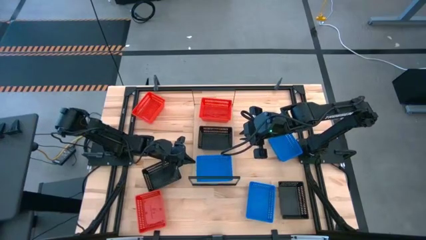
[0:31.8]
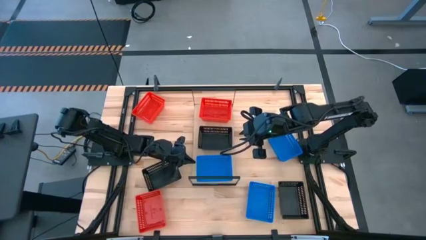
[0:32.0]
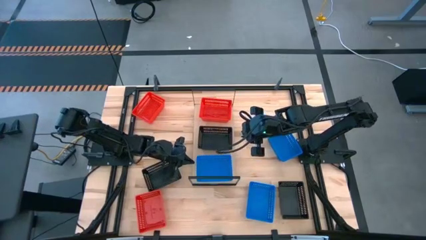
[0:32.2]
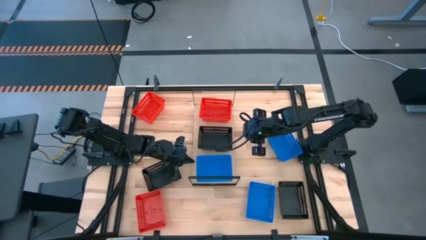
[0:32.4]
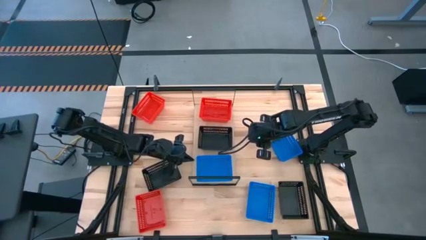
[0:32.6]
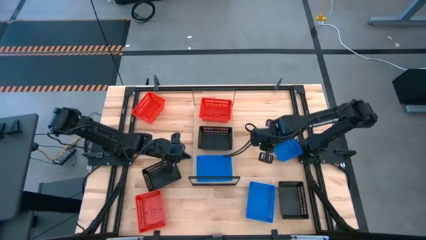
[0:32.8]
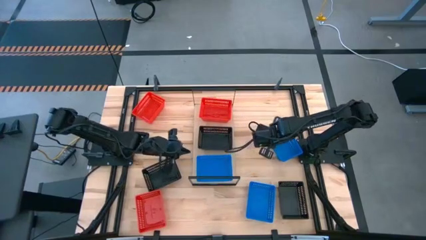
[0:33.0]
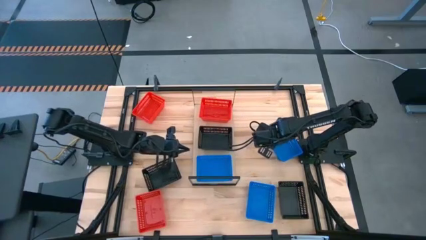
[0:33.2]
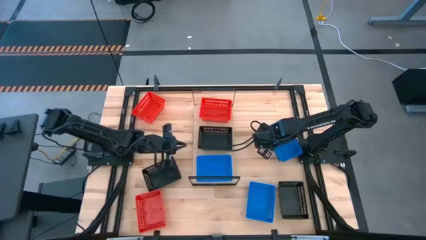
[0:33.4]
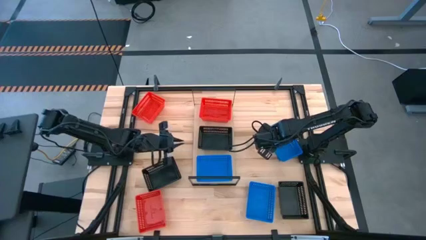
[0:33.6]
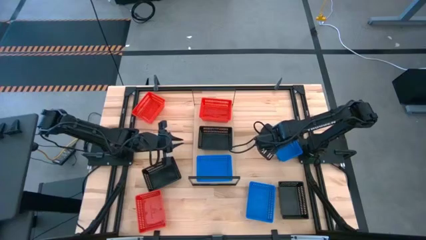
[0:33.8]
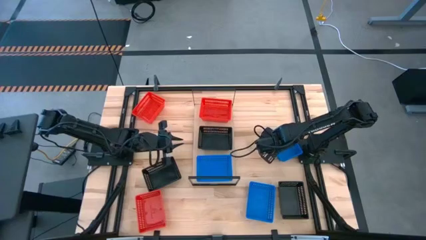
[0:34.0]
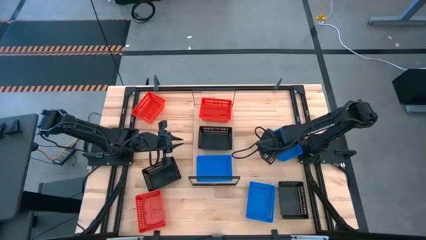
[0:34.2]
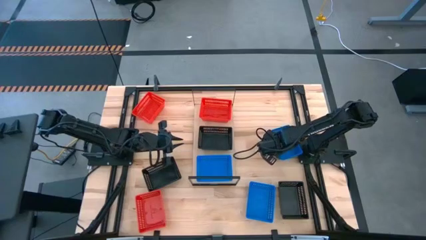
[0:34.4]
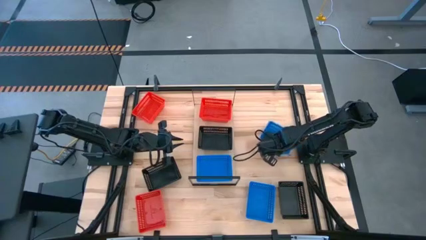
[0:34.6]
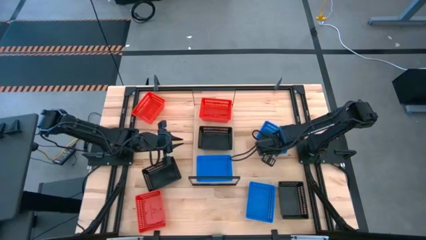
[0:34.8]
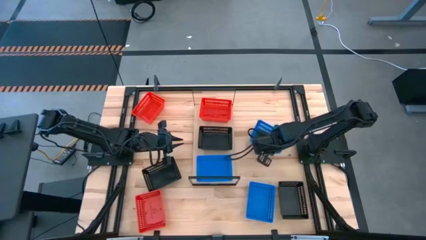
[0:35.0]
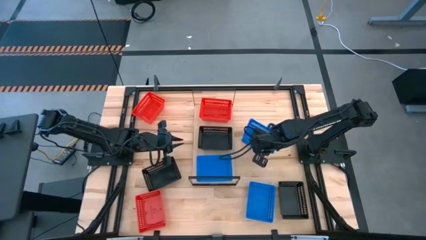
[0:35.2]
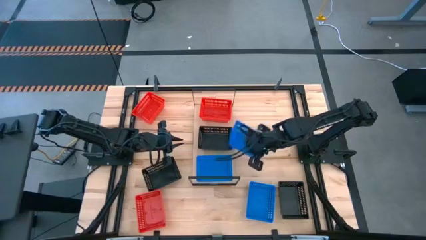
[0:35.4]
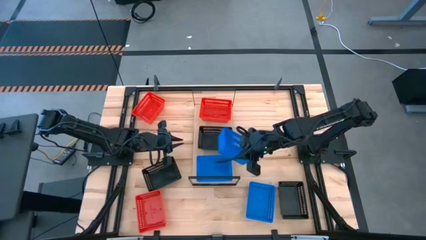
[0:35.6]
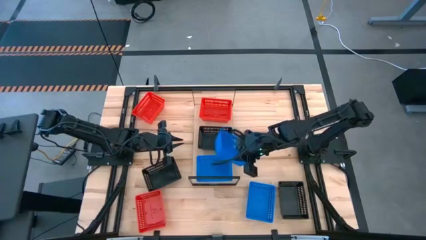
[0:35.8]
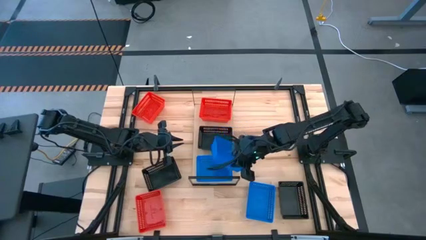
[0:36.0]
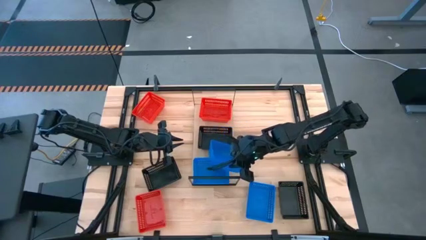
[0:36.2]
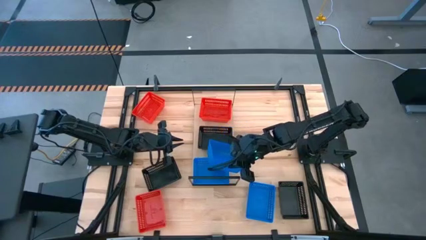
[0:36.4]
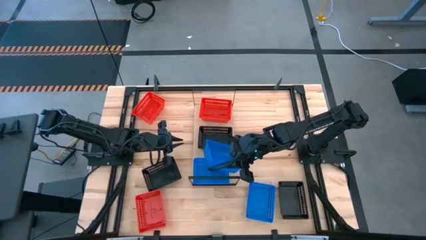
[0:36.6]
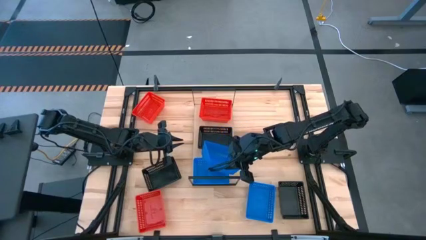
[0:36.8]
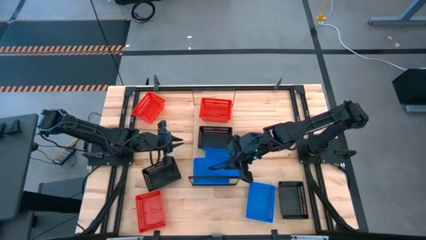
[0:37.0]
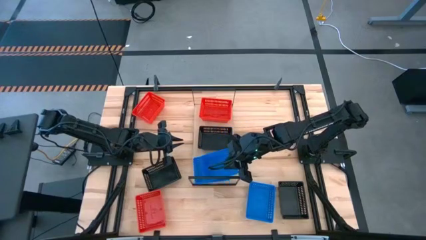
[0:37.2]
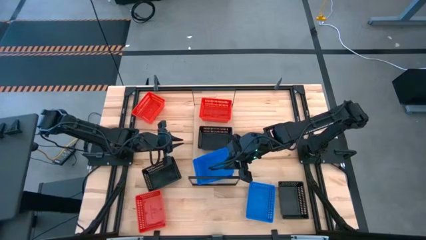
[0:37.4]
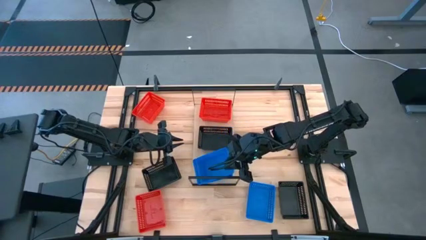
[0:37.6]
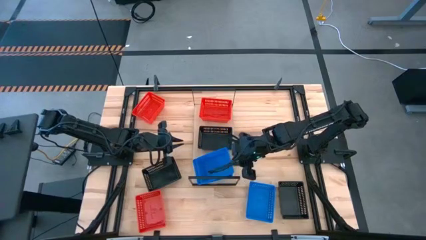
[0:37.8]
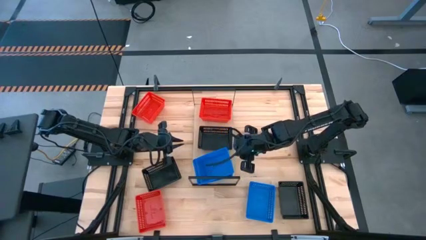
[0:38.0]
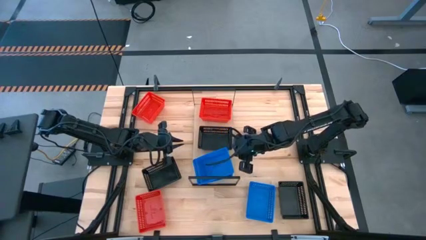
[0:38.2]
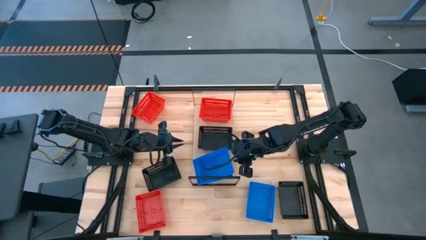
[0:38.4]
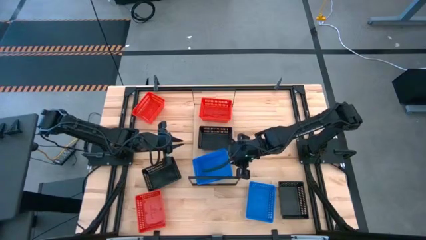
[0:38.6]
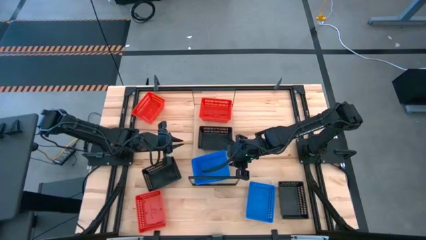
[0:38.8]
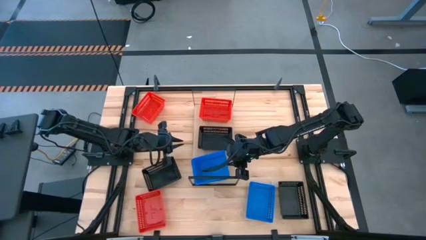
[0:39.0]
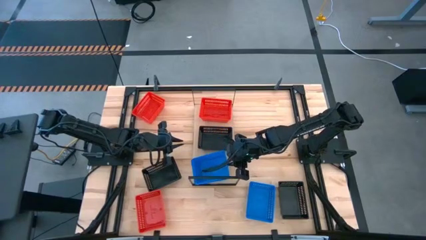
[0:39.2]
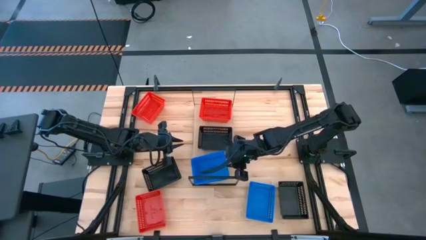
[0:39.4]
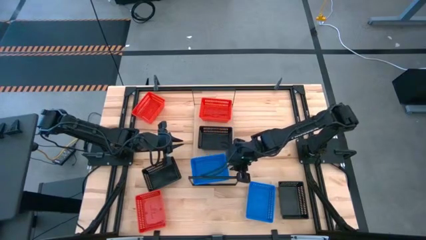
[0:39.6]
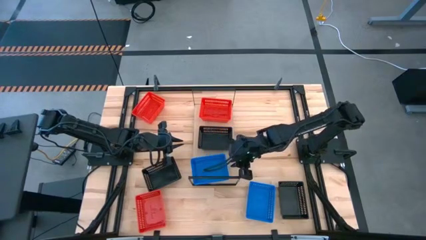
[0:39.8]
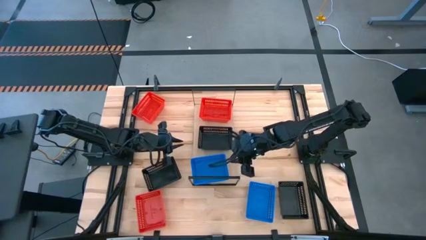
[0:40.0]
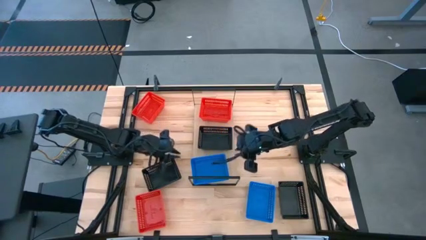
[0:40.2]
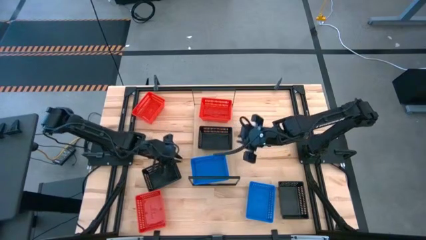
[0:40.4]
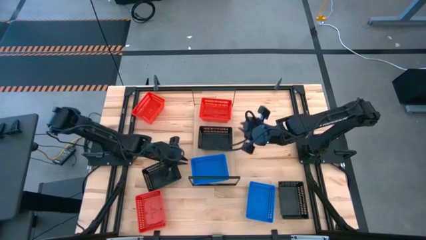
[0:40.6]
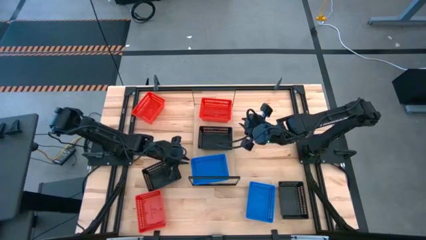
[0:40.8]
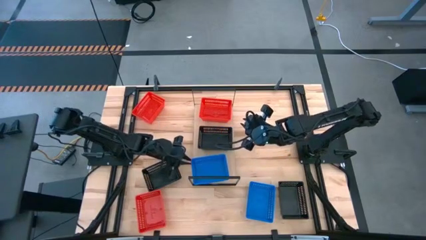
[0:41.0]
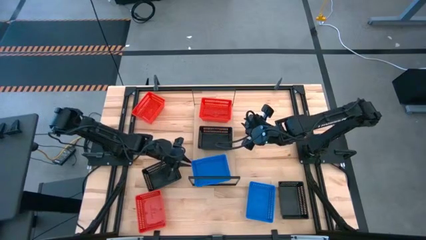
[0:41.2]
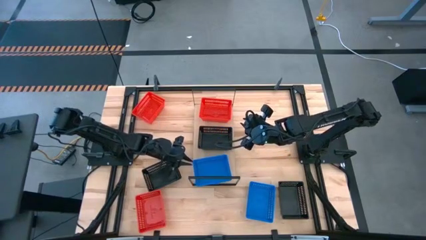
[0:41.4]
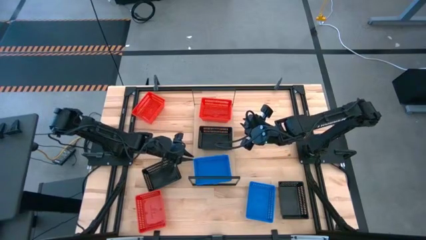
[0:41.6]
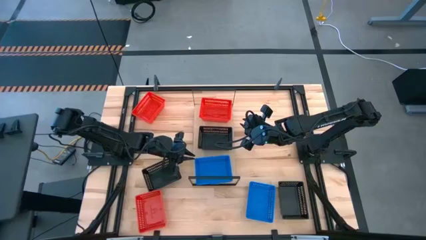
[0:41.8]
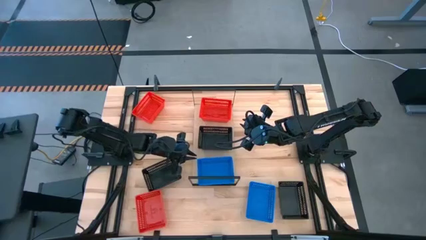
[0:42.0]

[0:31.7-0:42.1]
Task: Stack baskets on shelf by color
Stack the top blue bin on top of the blue bin on the shelf

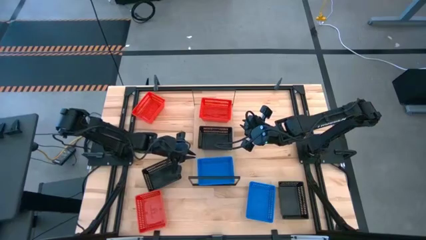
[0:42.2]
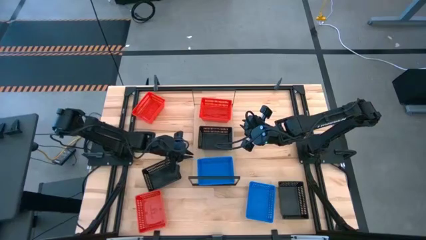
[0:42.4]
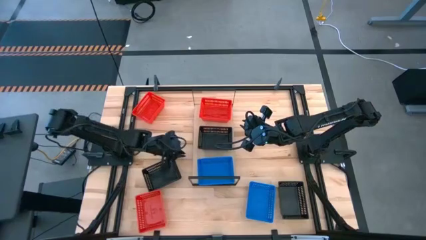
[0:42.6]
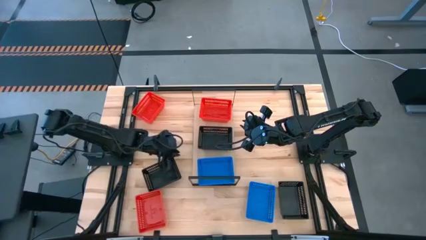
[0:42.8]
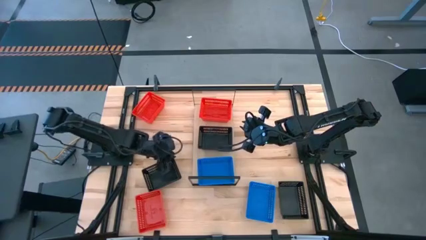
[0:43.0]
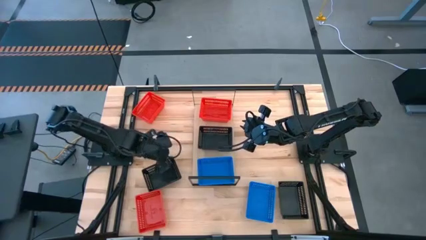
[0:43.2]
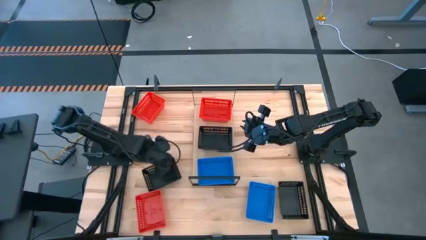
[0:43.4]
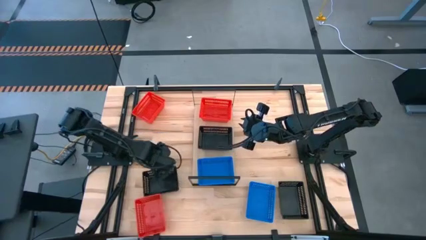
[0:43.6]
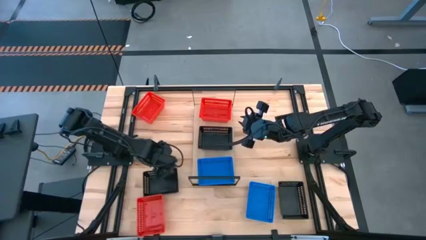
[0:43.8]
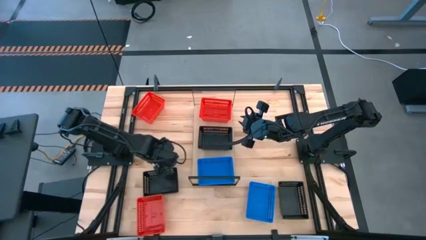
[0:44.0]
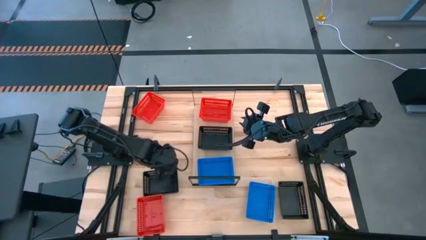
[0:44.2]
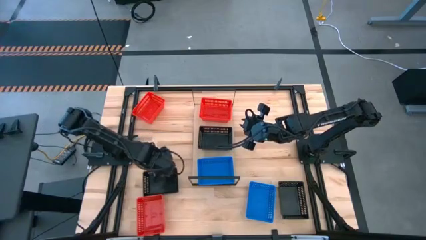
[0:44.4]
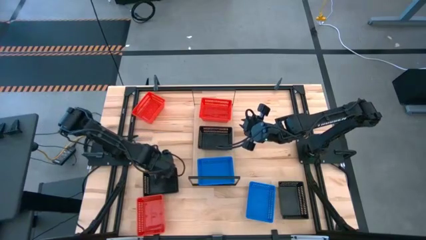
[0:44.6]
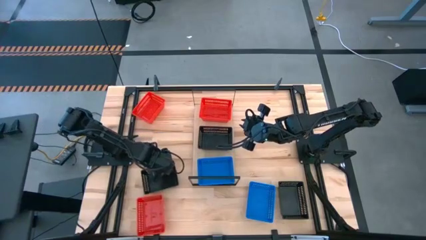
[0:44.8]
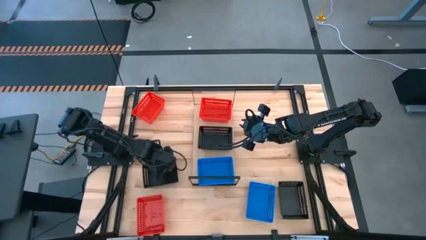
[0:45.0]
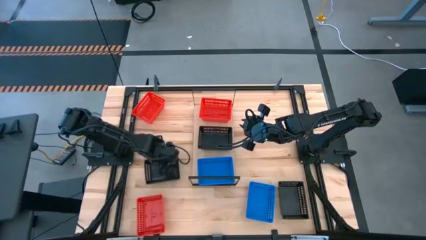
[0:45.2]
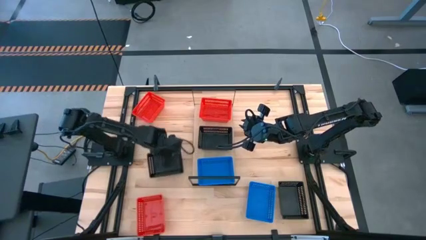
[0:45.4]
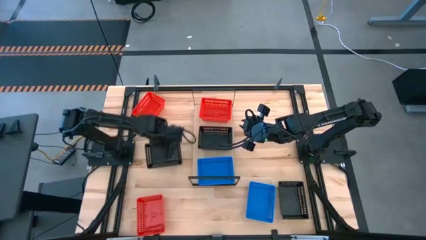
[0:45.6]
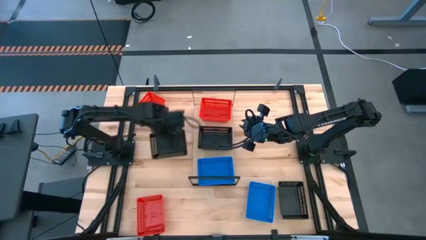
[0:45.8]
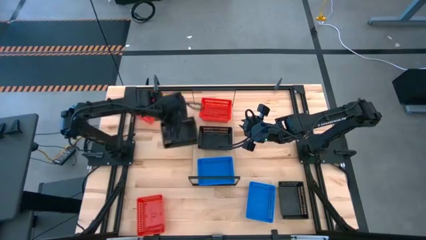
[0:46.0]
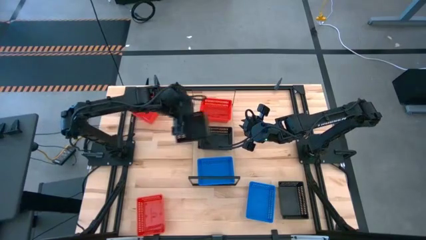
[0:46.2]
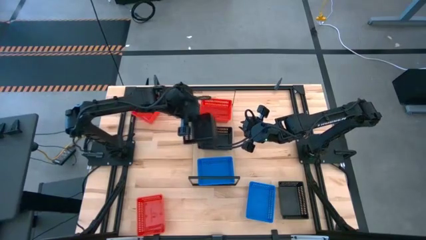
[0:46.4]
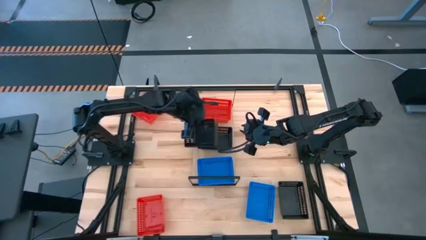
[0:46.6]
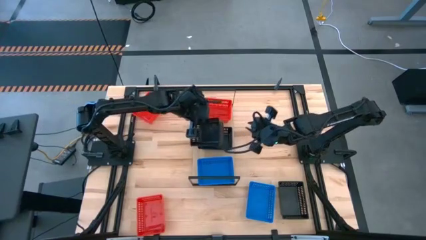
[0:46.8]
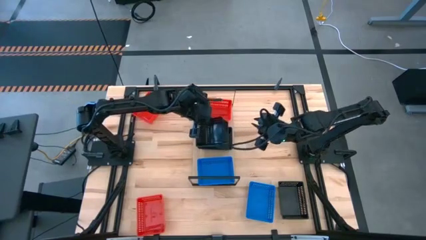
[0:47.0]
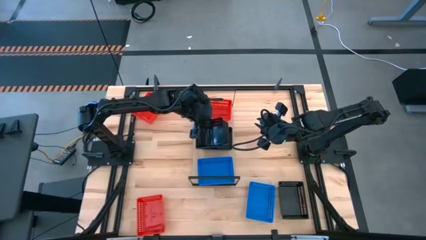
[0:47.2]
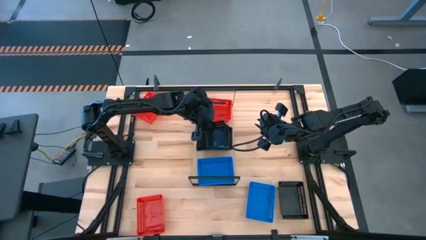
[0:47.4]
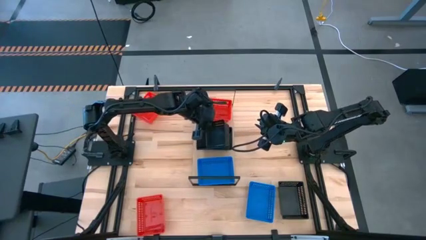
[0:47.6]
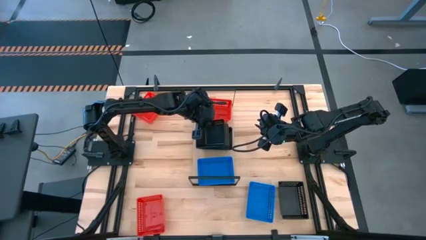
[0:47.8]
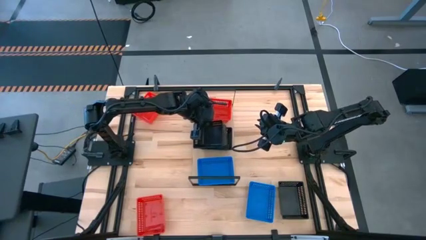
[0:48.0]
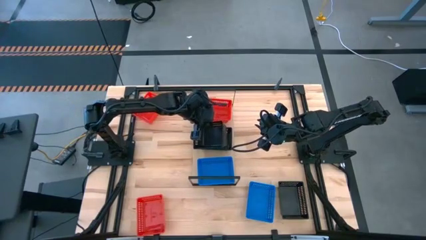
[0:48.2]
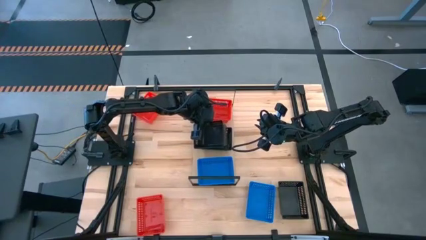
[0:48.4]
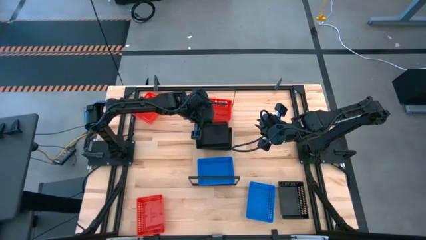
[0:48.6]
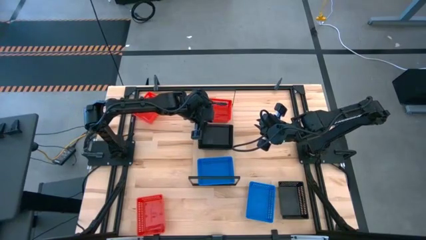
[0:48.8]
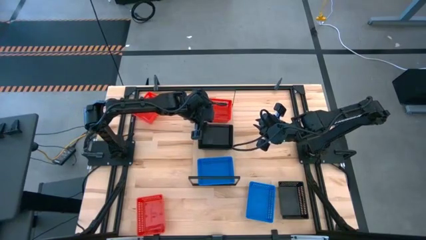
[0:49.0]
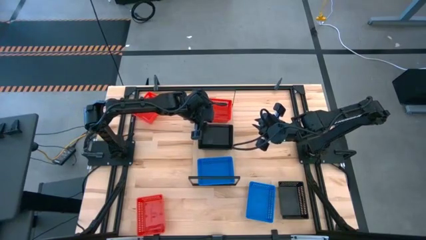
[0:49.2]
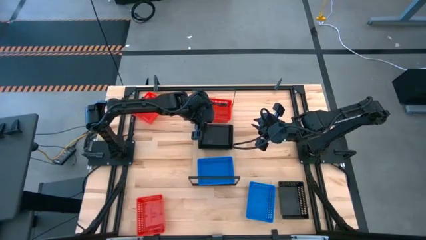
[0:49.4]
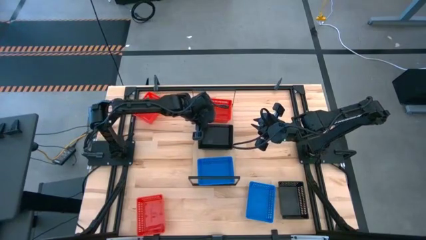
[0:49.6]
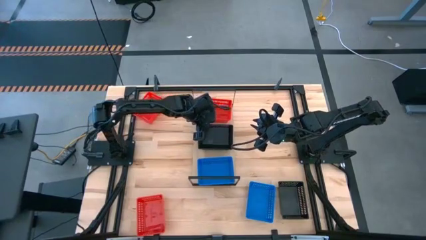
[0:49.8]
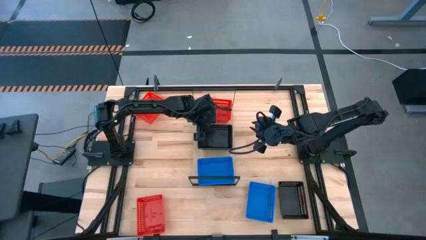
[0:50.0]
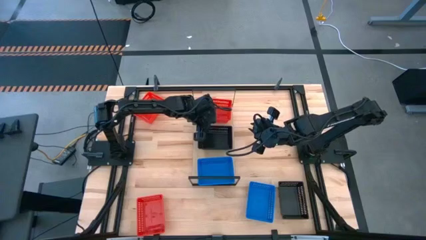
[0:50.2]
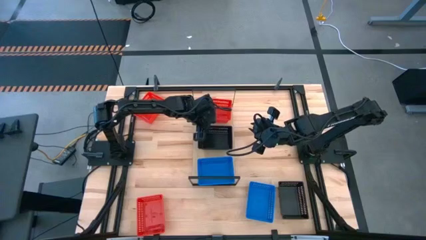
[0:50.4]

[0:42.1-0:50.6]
Stack the left black bin on top of the black bin on the shelf
